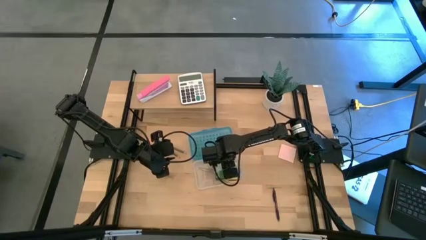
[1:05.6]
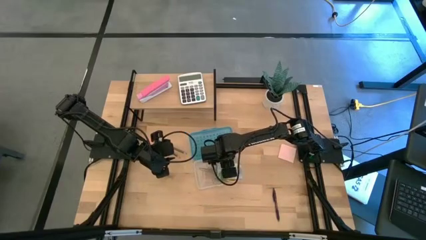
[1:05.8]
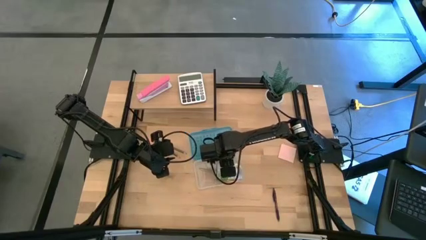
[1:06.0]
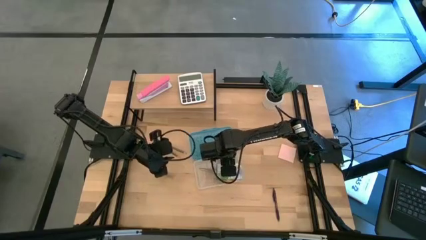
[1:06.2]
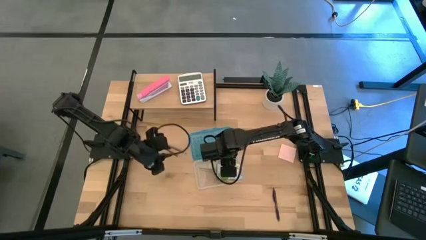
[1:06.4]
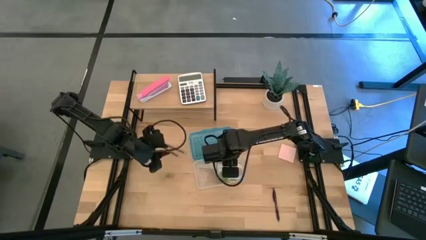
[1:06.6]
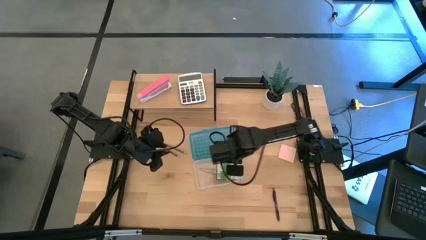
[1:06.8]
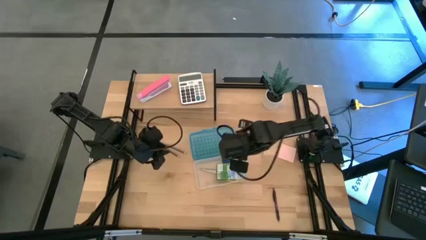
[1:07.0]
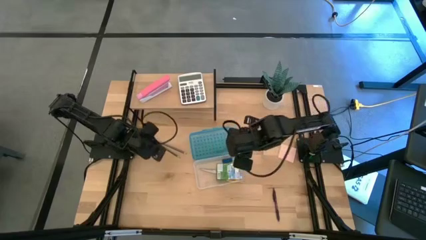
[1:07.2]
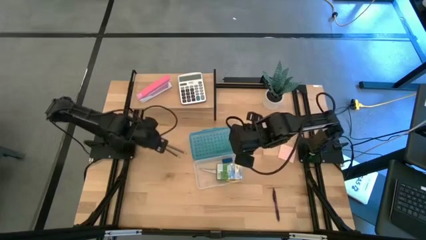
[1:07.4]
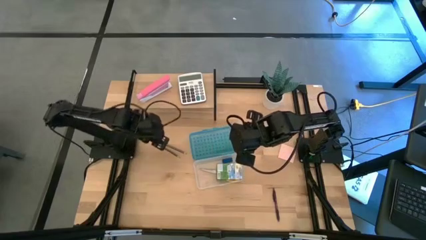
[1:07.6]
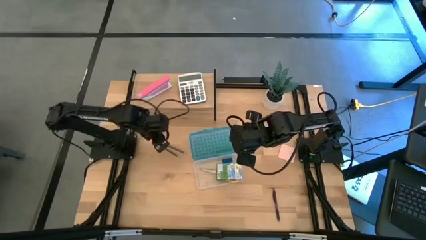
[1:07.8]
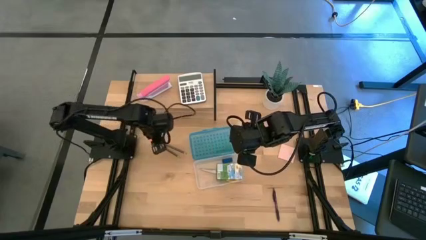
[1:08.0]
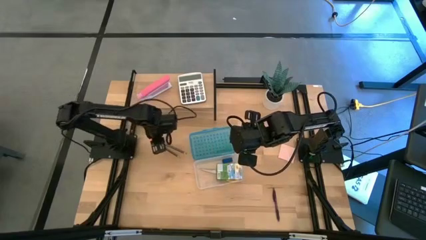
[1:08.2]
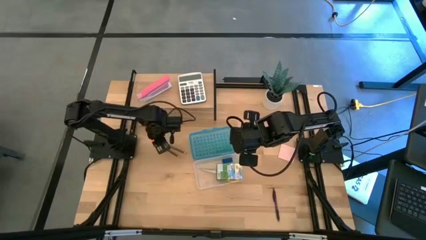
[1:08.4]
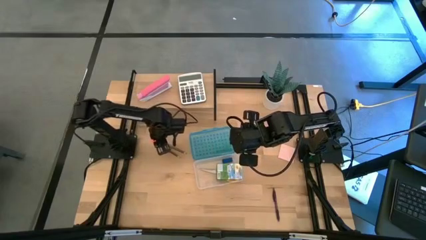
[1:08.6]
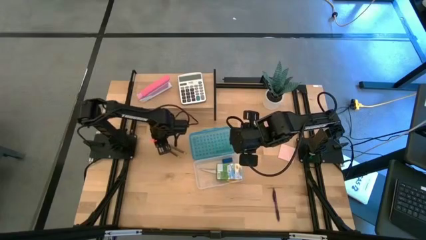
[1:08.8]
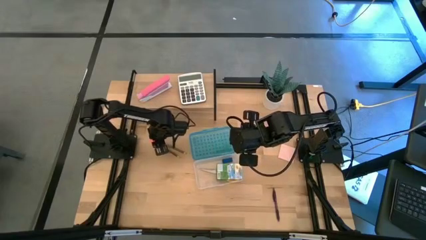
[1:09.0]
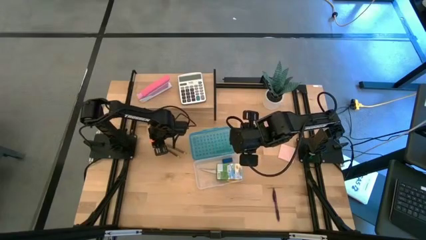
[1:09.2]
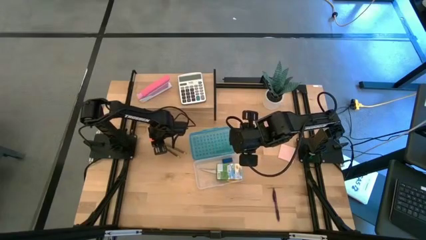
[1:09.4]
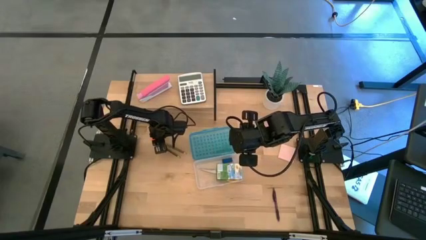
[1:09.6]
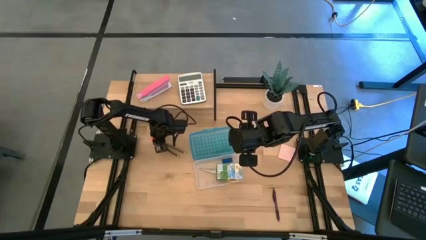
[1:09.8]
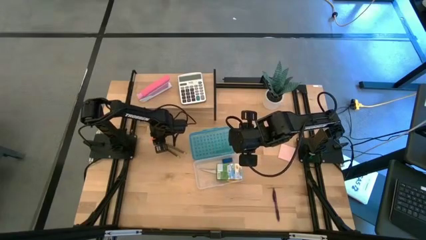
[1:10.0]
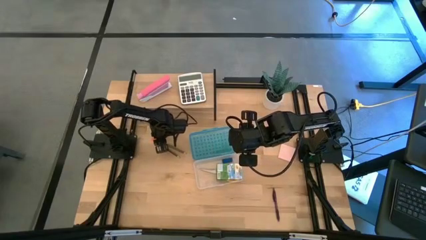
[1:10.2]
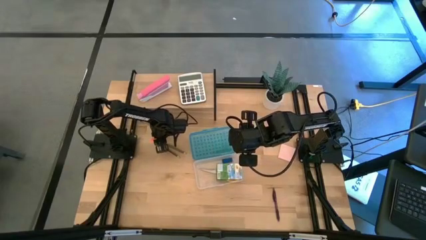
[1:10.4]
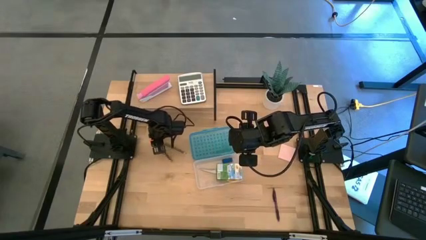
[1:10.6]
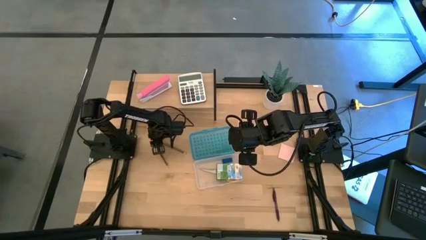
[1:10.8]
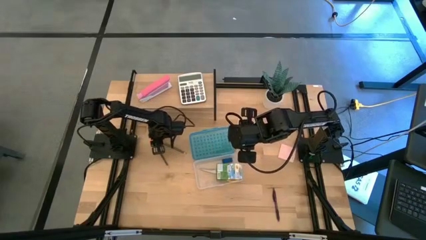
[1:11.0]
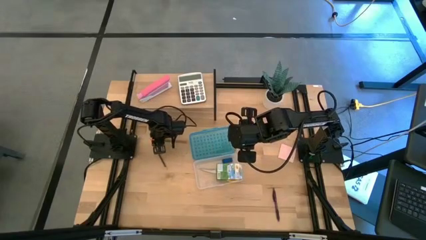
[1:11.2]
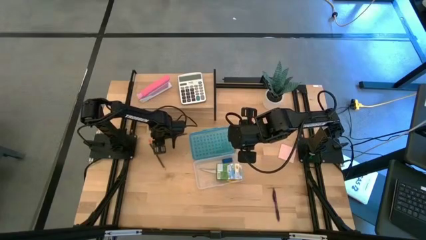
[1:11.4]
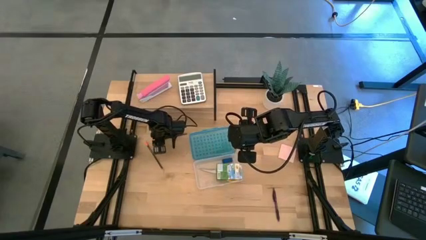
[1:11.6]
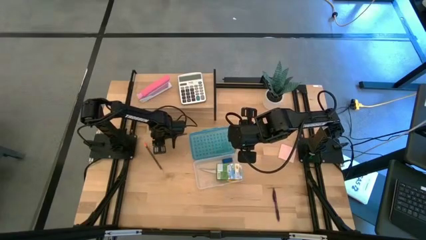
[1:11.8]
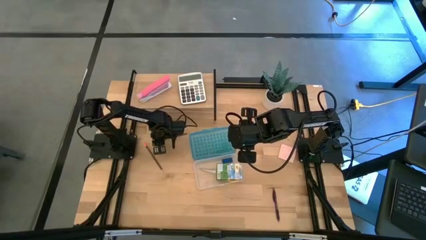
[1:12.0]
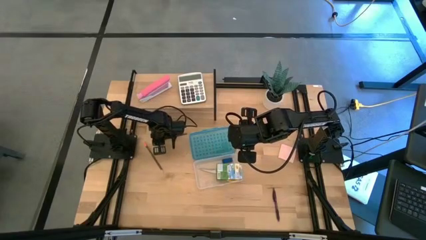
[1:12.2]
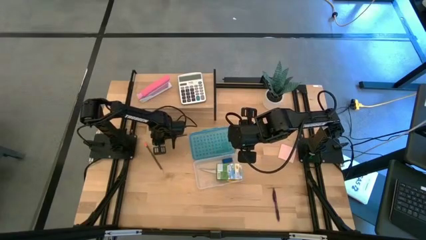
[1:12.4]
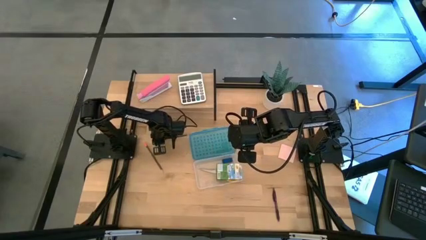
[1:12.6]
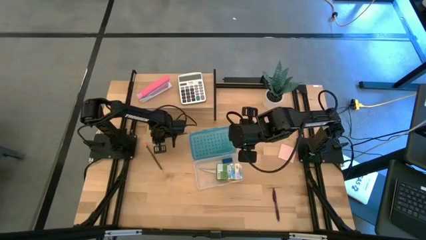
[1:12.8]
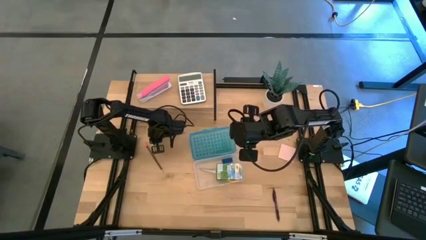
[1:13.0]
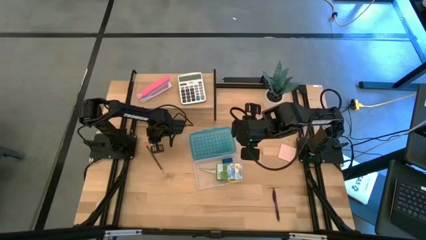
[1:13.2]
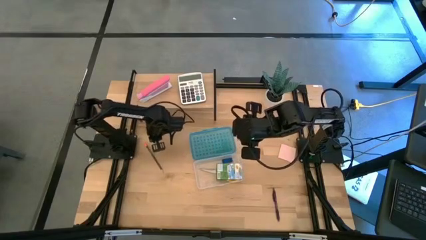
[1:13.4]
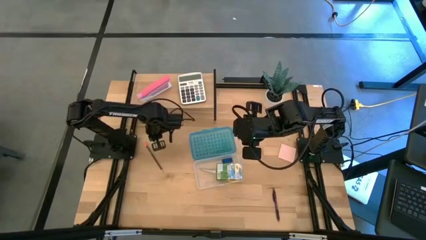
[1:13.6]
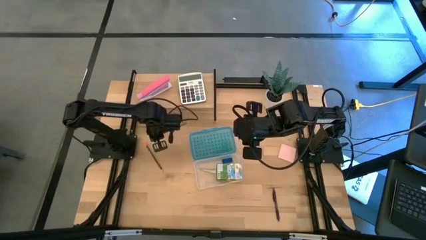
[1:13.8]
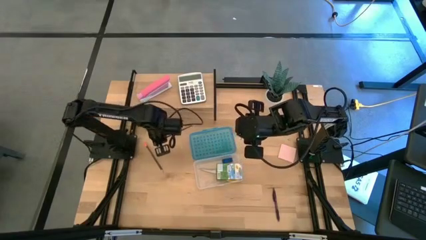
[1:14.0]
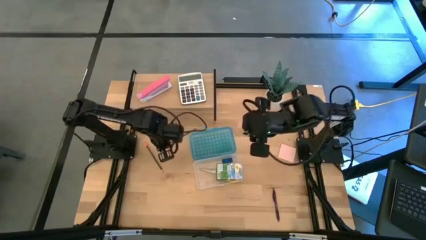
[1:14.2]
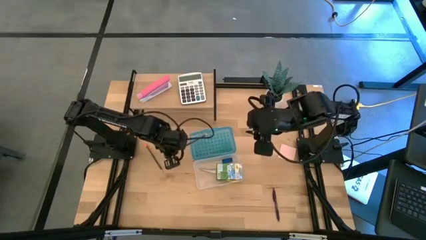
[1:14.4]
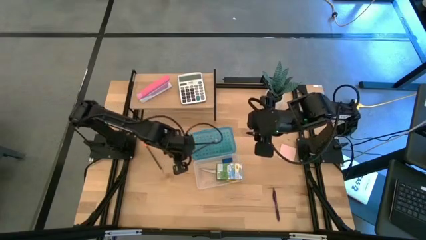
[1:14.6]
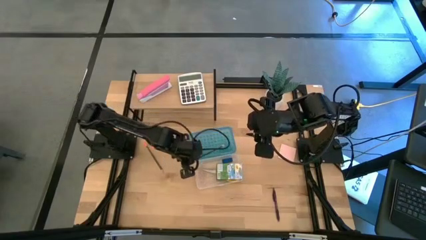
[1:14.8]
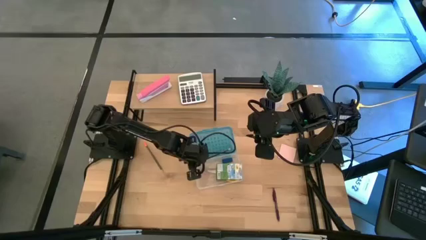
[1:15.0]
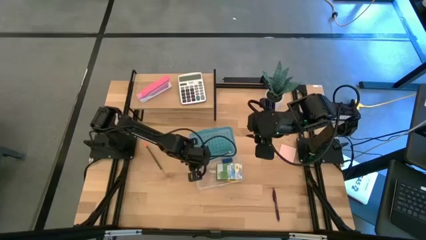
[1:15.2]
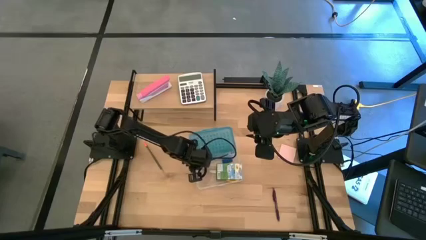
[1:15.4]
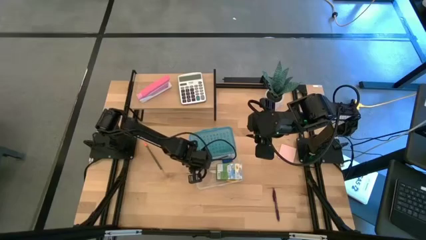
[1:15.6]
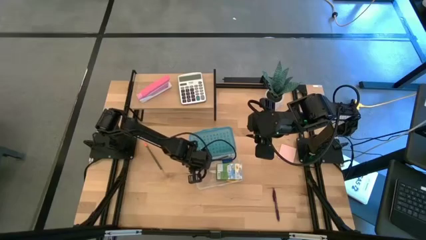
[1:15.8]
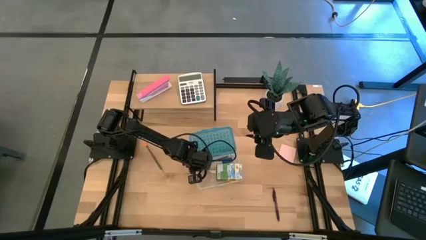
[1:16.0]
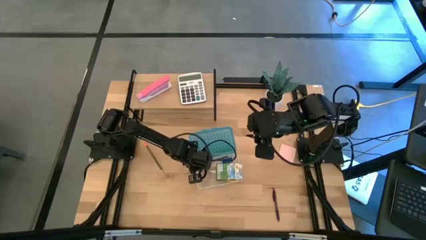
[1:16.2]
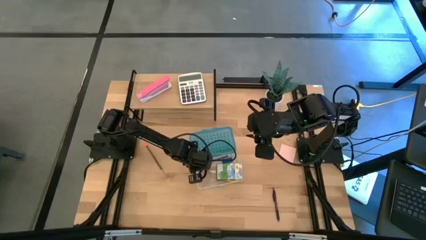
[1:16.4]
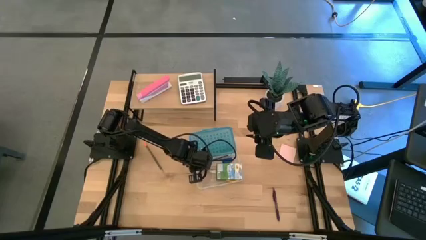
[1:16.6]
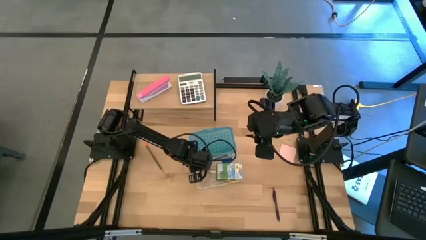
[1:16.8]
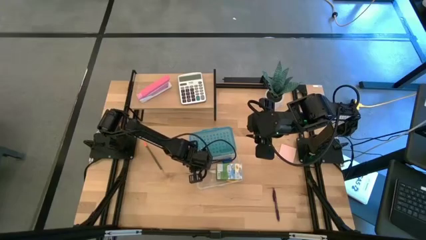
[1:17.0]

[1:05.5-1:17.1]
Task: Pack school essentials
Put the pink pencil into the blue supply box
